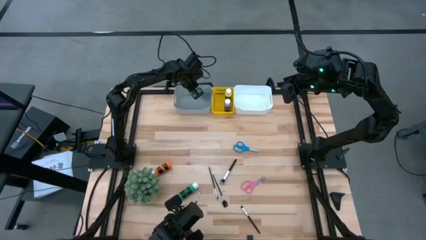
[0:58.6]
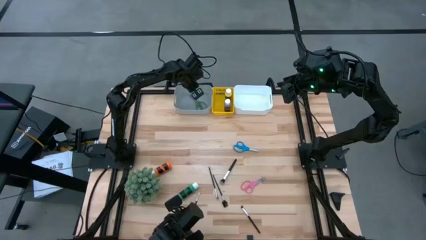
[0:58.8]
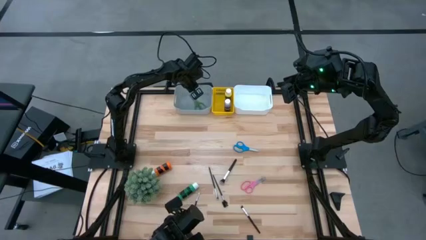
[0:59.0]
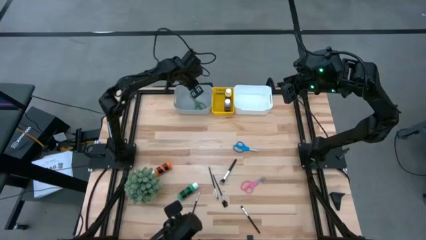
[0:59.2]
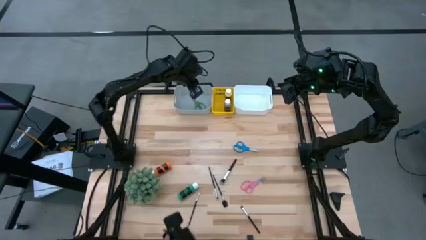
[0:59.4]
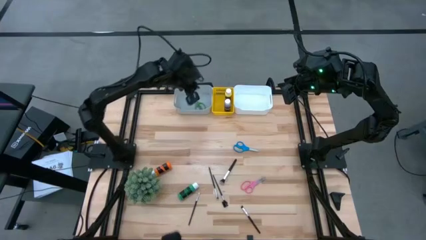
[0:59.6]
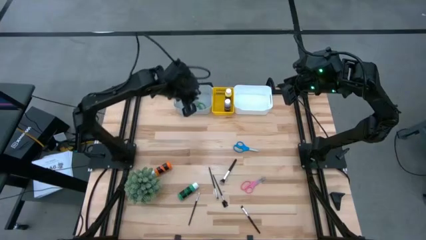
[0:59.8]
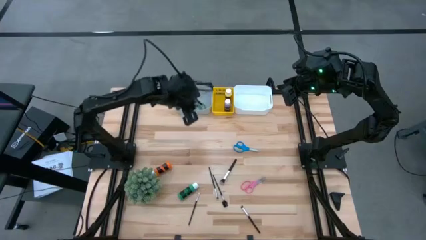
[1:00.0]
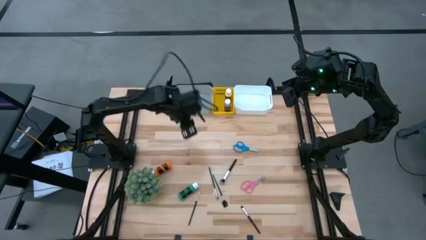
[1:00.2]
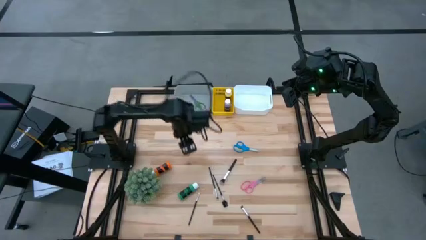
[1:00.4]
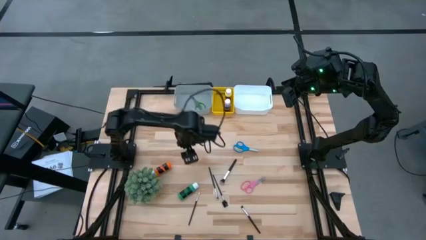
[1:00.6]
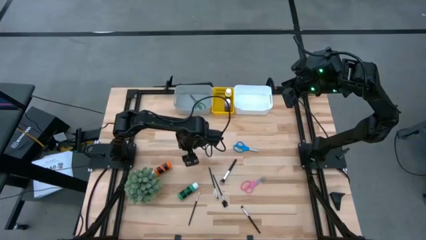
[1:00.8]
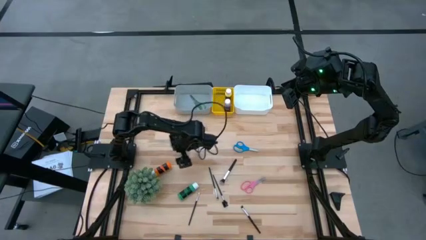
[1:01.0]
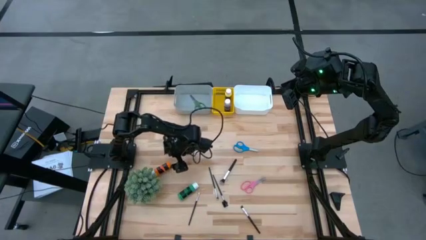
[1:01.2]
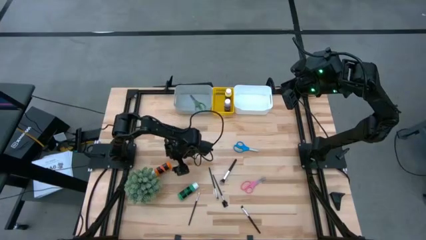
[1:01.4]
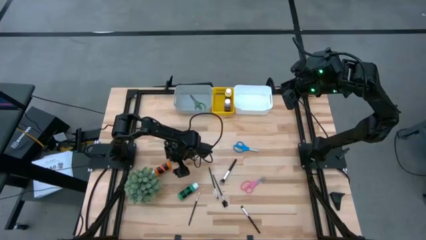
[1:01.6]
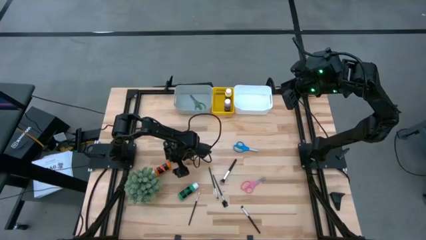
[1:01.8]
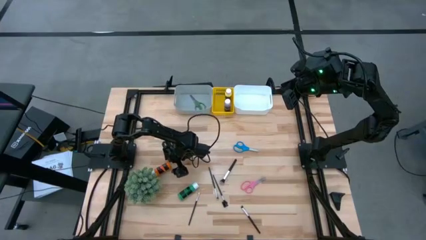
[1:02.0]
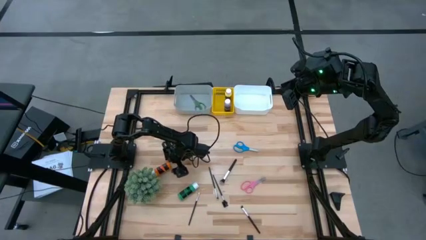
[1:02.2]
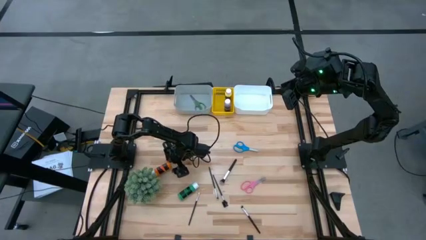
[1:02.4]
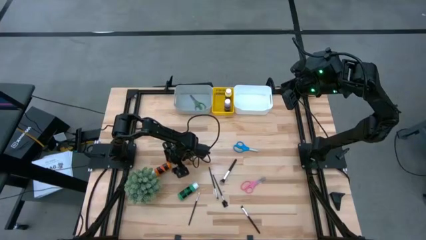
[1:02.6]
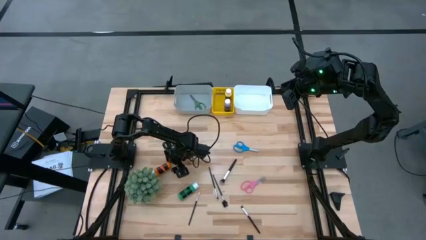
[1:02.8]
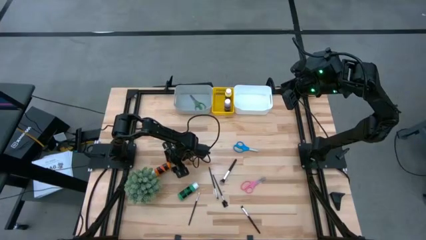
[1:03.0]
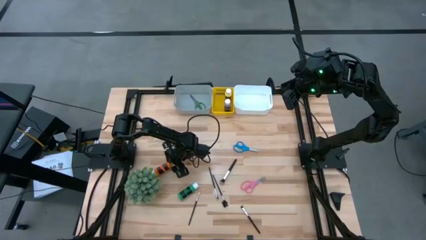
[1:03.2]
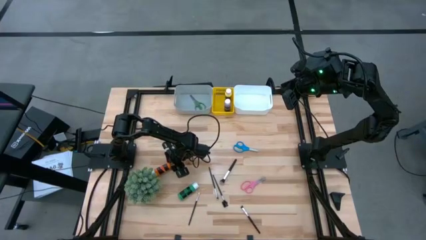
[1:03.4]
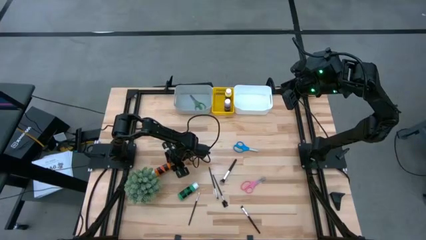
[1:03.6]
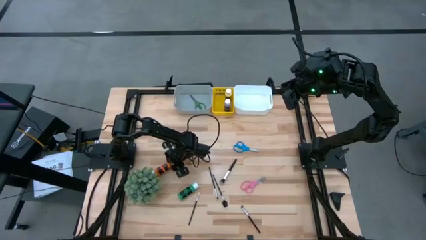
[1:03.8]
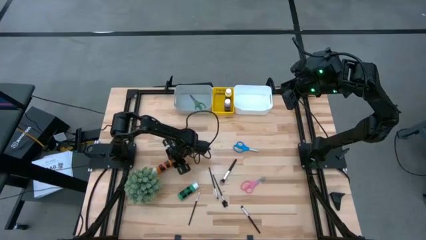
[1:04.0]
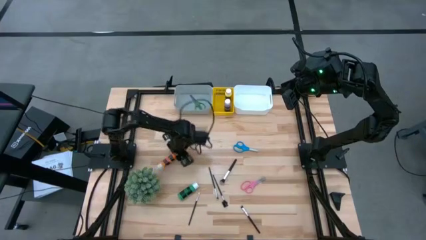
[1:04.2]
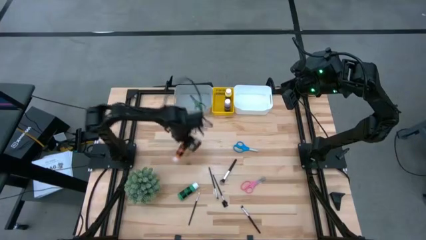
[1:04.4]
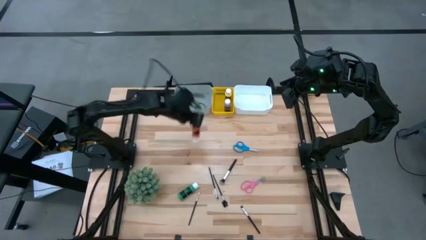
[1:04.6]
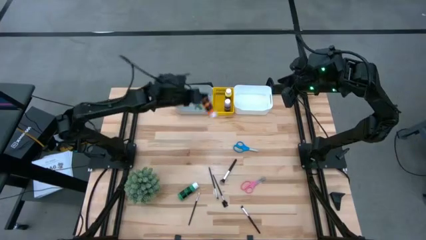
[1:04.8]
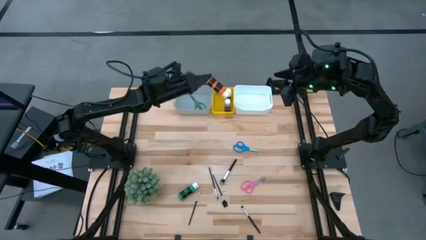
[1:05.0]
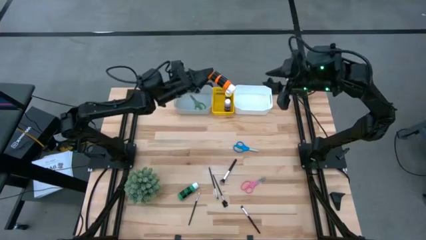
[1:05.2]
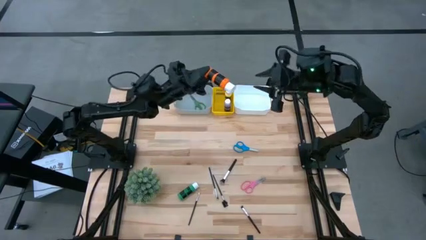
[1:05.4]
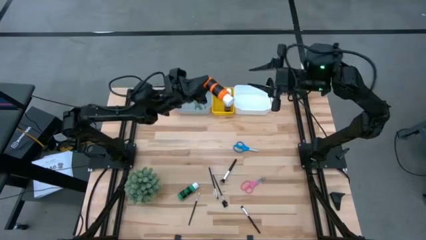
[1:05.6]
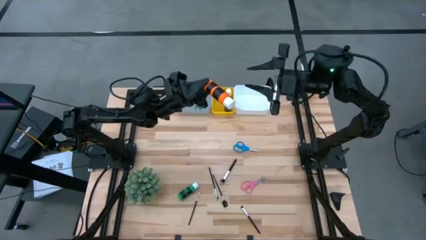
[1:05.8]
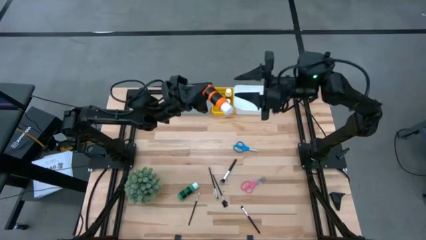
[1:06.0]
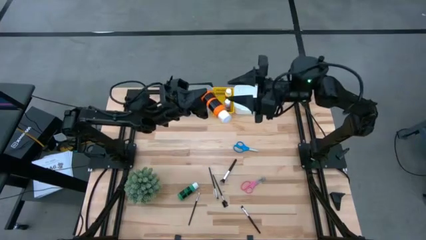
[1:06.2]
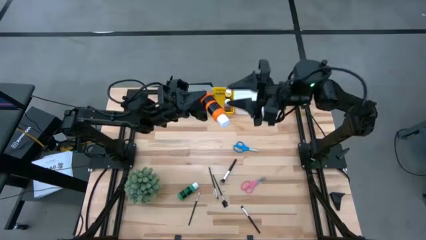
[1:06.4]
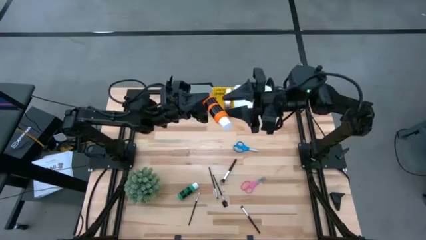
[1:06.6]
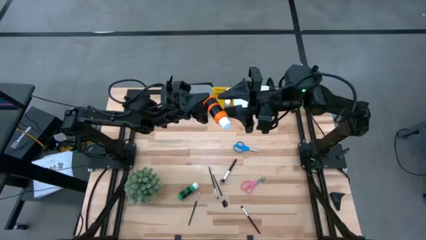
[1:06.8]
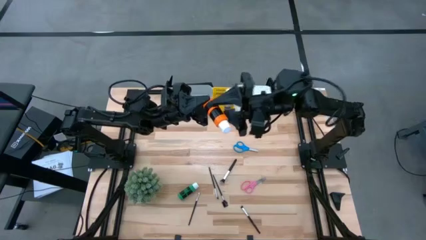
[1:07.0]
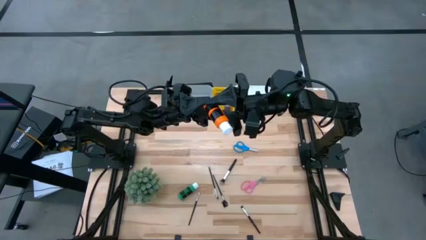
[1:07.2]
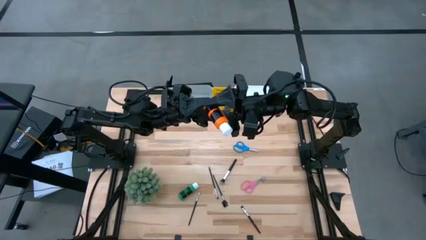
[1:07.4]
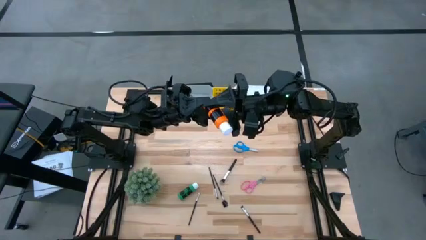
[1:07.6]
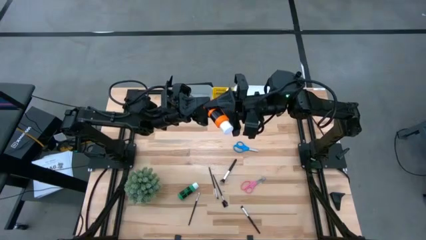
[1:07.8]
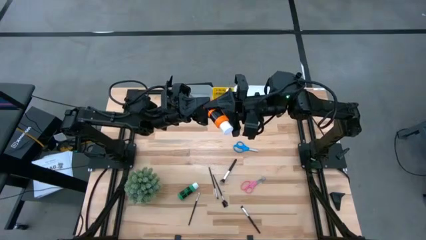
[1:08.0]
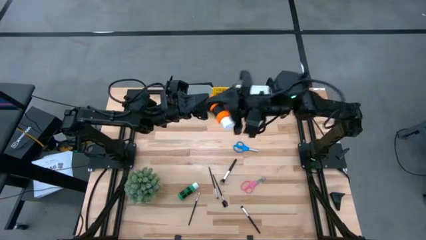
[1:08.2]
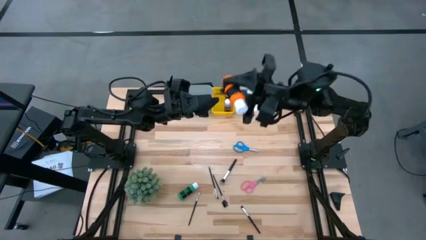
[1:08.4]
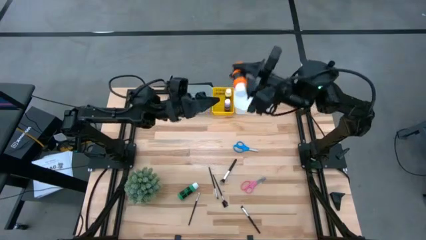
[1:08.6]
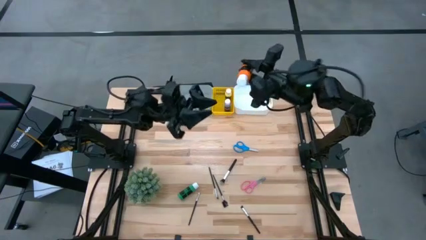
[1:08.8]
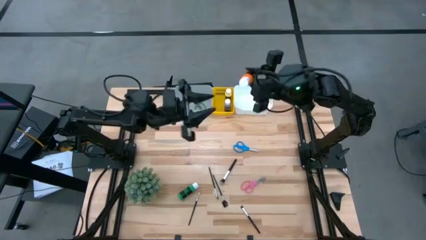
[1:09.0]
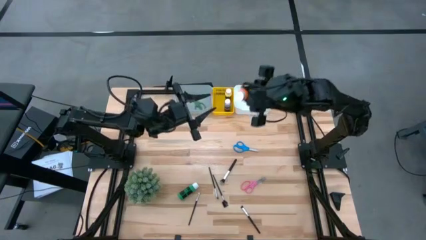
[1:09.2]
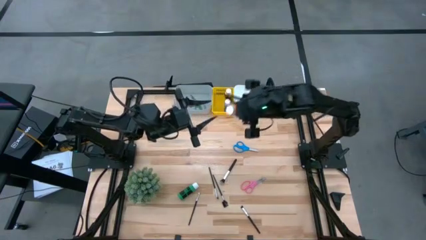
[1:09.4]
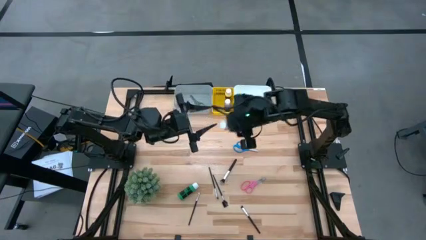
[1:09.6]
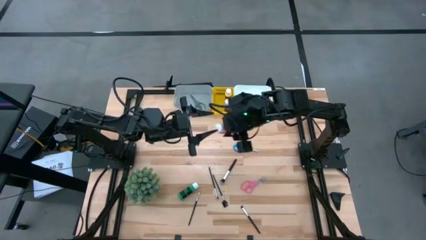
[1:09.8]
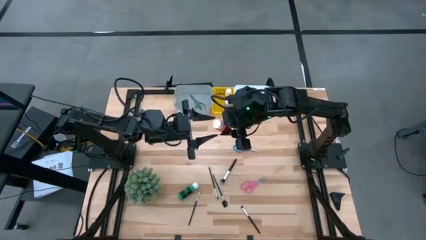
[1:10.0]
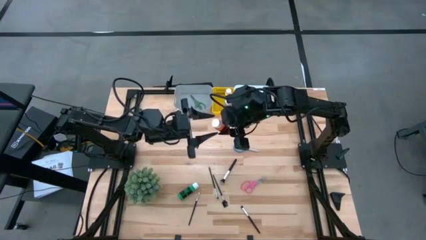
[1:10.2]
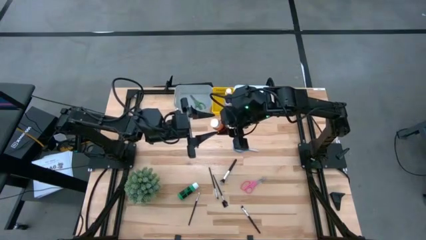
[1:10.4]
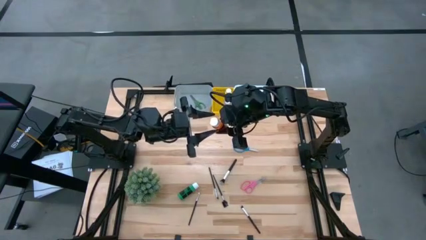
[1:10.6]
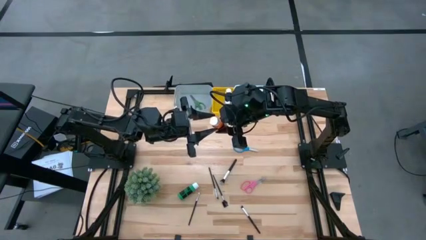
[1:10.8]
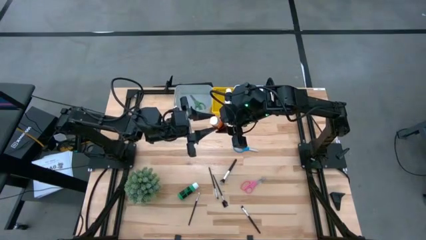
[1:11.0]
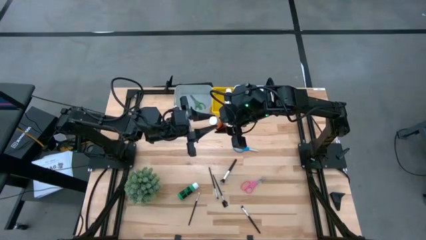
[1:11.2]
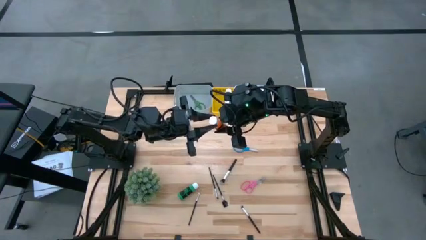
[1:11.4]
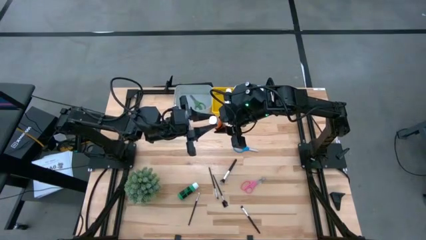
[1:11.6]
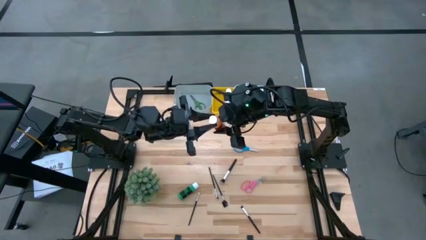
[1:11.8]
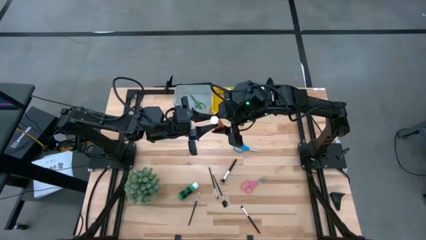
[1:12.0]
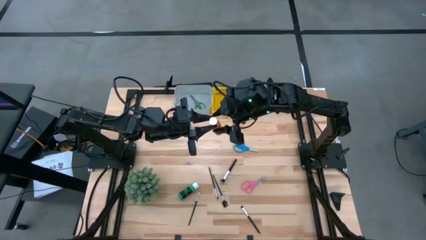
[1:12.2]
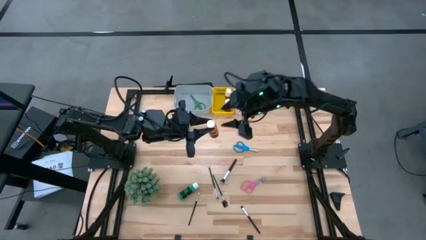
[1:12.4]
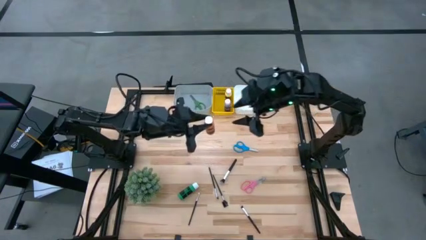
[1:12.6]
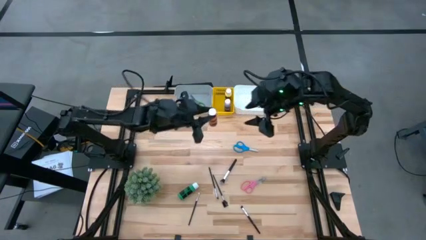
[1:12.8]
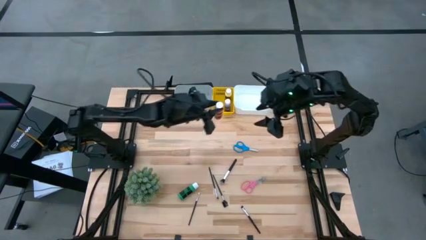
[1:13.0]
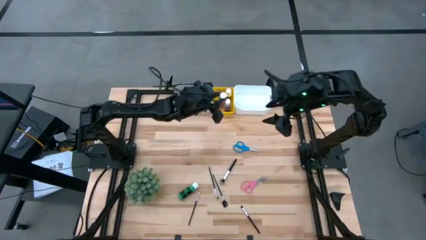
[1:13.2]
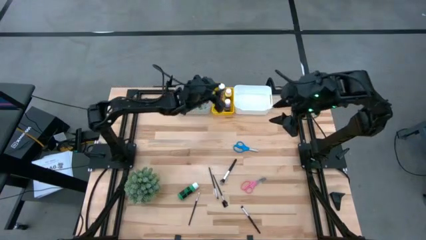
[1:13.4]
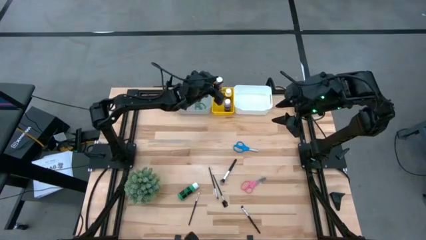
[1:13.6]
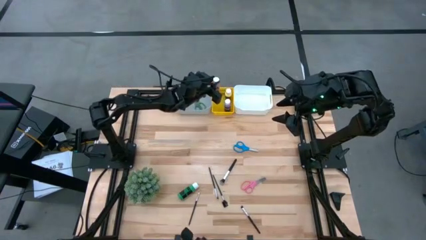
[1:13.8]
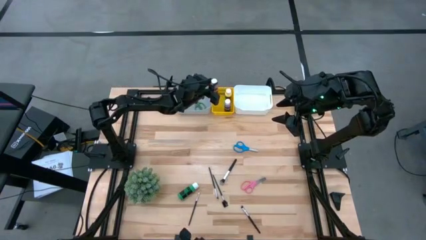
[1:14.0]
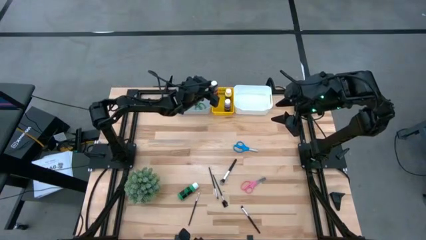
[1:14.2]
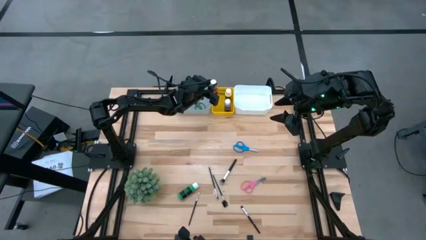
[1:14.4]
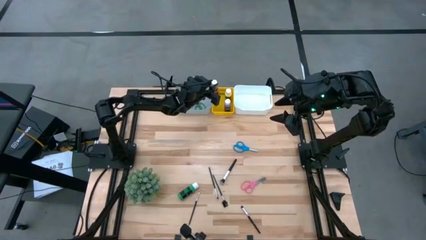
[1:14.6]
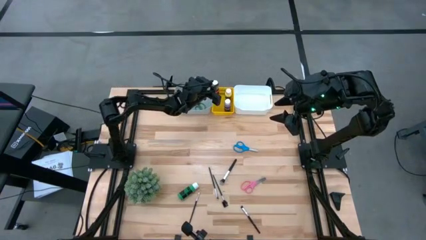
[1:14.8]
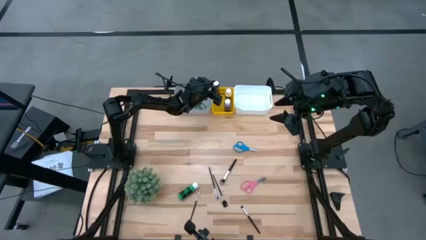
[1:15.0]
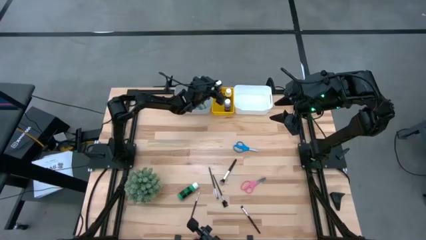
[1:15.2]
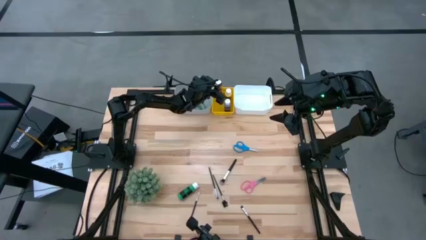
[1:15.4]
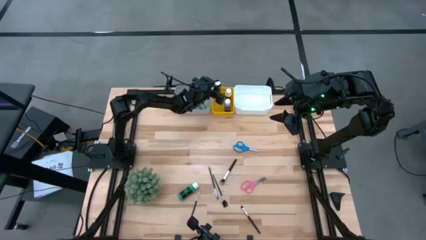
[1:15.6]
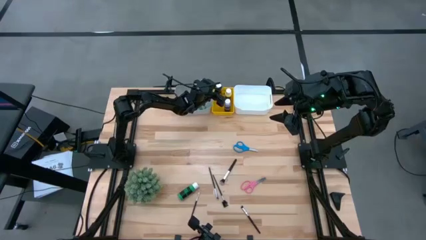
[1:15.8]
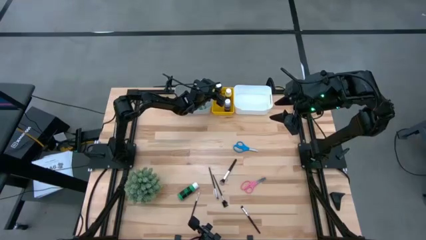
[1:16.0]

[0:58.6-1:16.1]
Task: Pick & Place Paint Supplies
Put the orange paint bottle into the yellow bin
